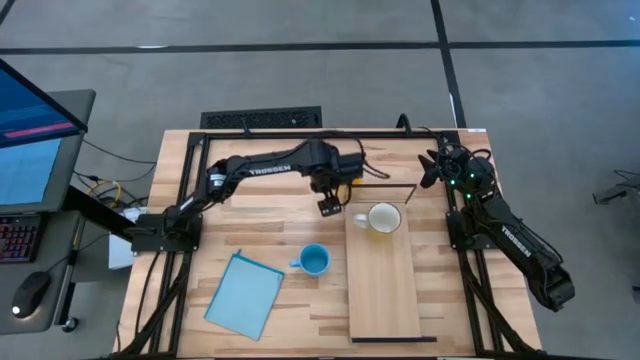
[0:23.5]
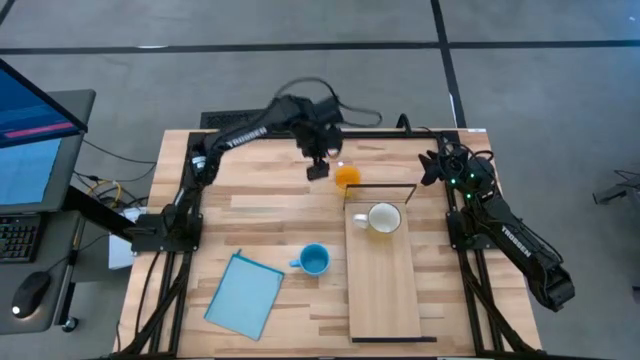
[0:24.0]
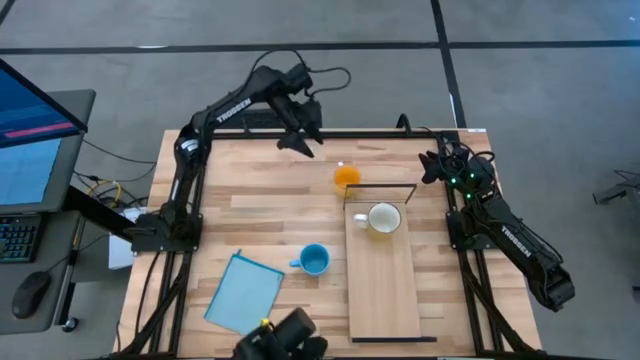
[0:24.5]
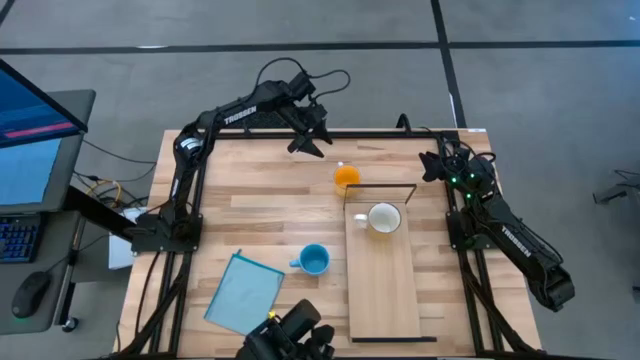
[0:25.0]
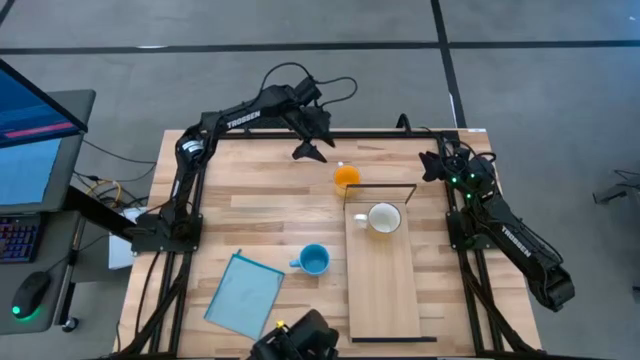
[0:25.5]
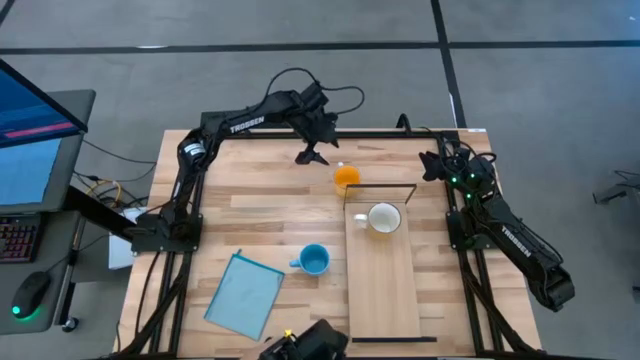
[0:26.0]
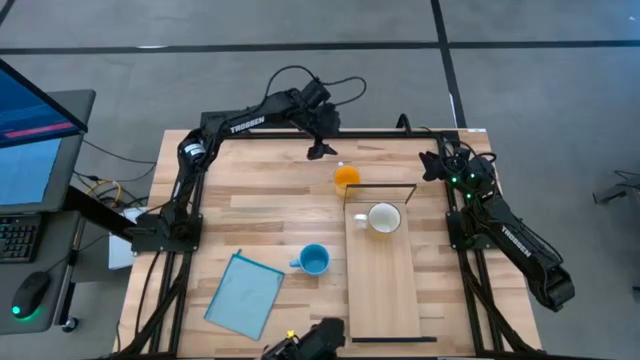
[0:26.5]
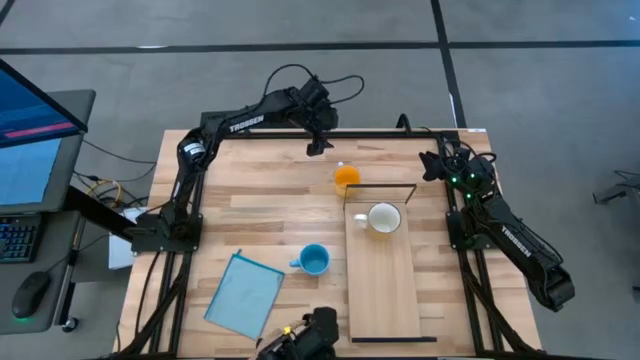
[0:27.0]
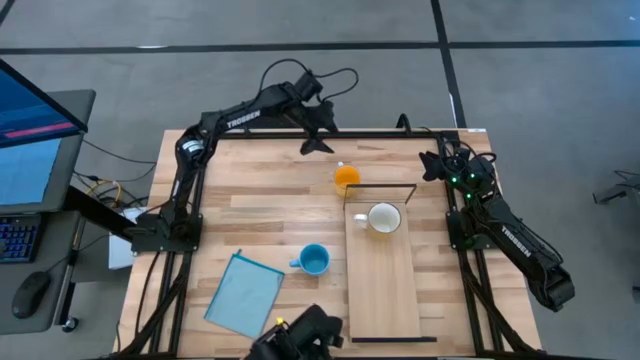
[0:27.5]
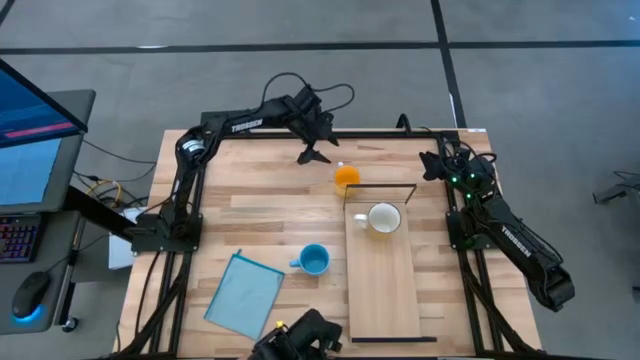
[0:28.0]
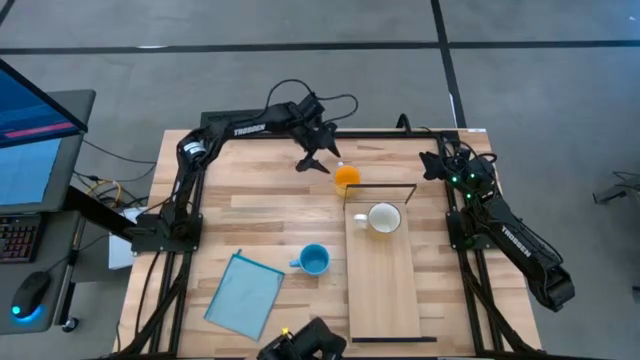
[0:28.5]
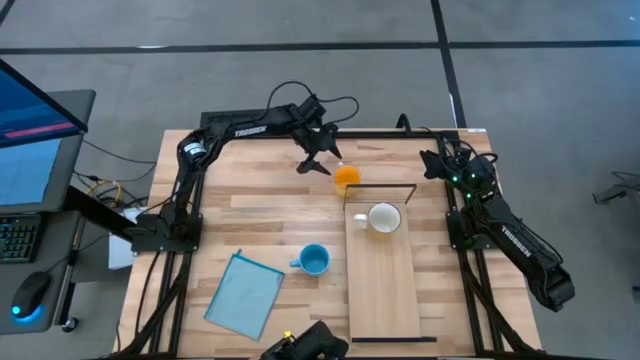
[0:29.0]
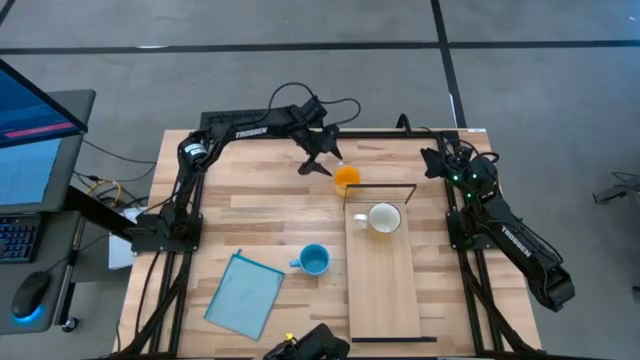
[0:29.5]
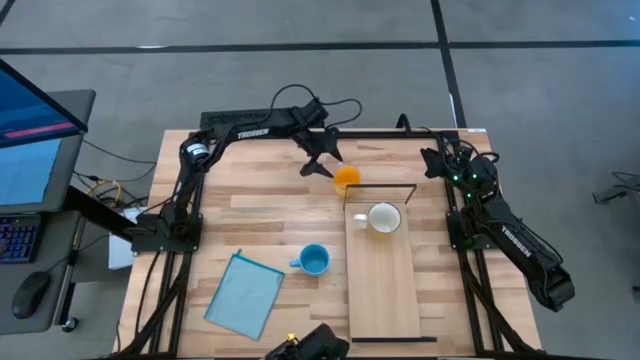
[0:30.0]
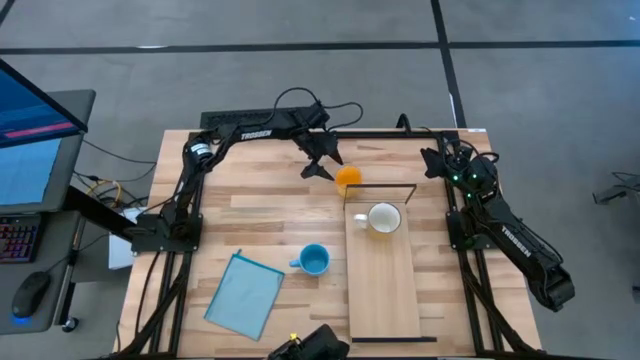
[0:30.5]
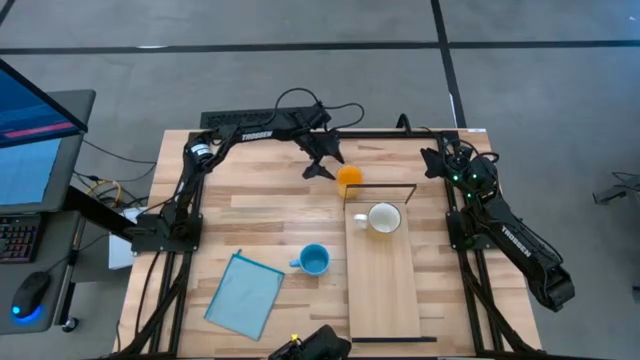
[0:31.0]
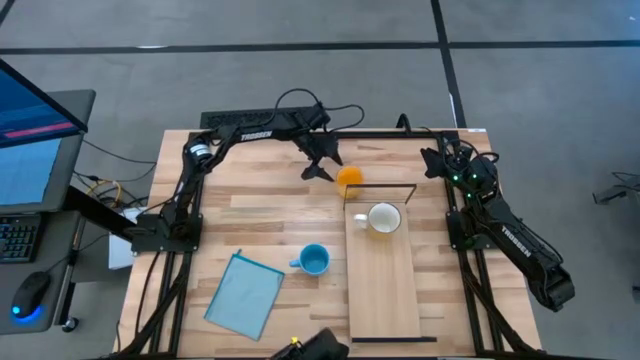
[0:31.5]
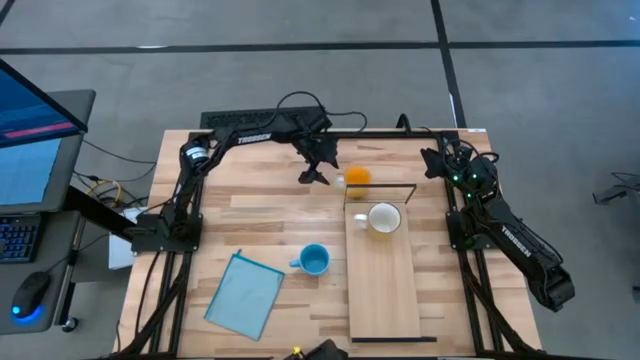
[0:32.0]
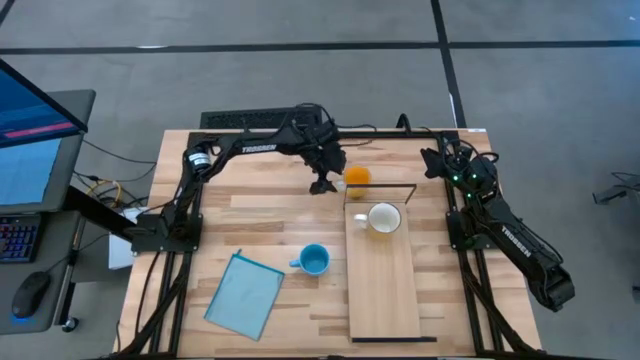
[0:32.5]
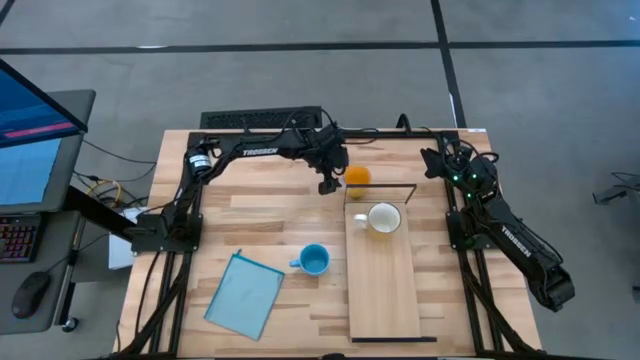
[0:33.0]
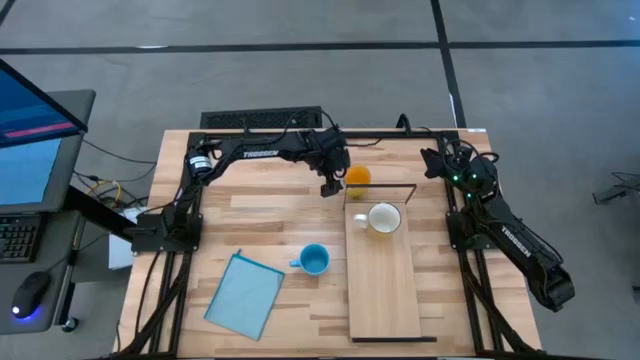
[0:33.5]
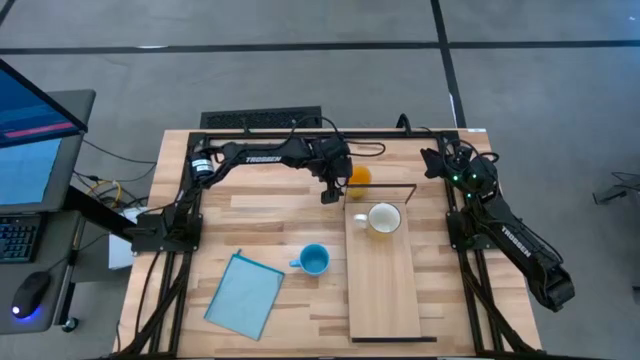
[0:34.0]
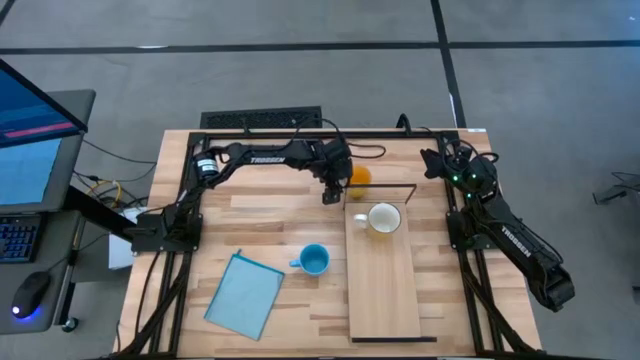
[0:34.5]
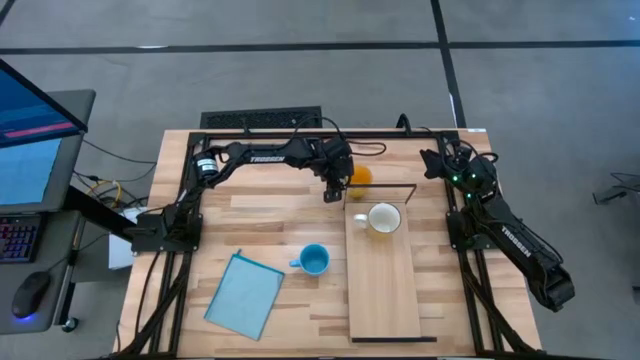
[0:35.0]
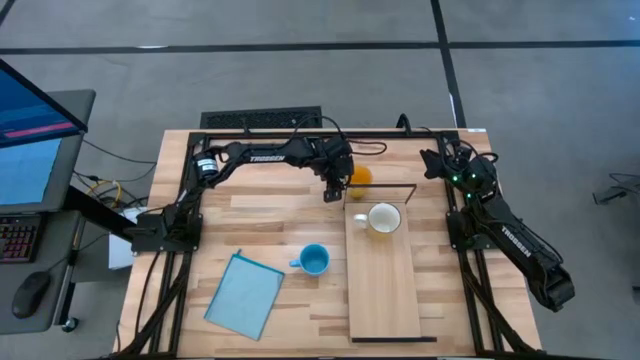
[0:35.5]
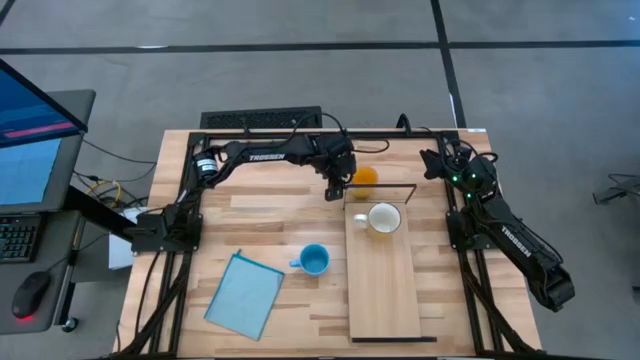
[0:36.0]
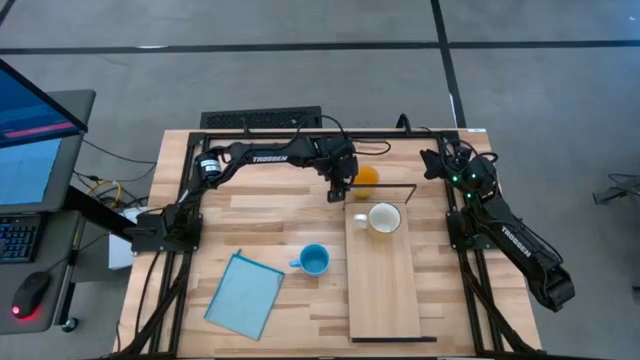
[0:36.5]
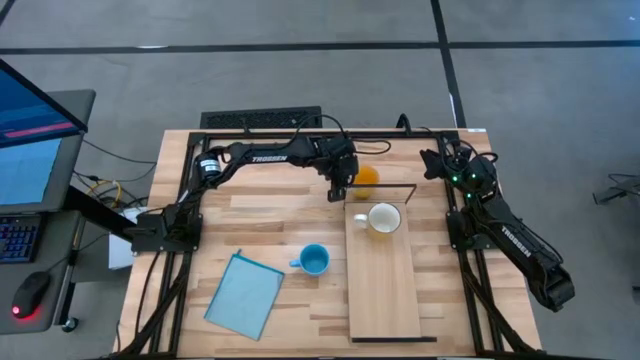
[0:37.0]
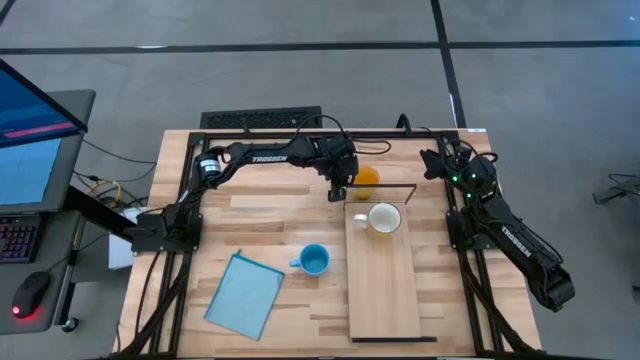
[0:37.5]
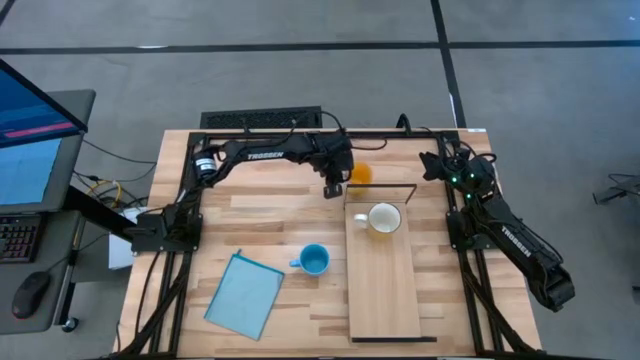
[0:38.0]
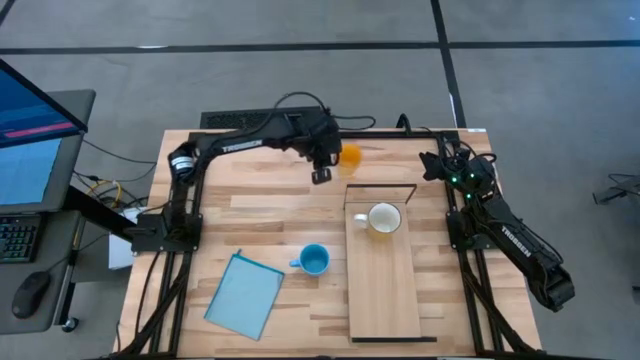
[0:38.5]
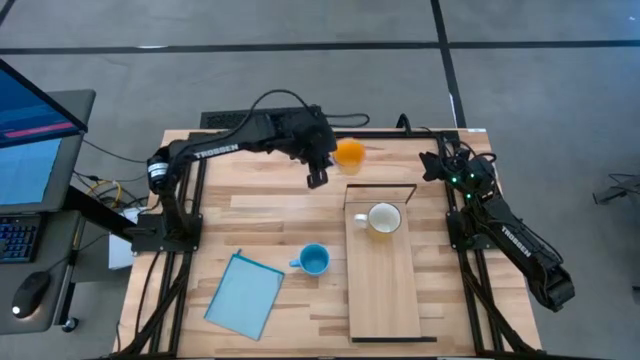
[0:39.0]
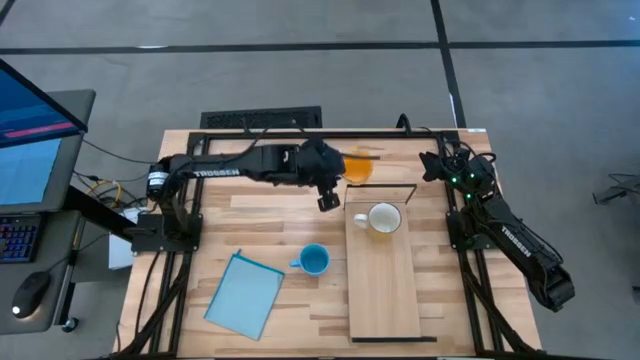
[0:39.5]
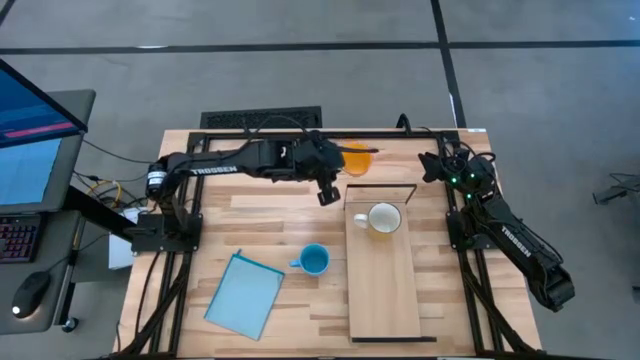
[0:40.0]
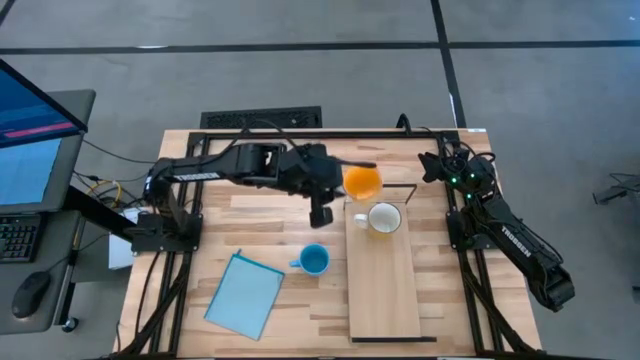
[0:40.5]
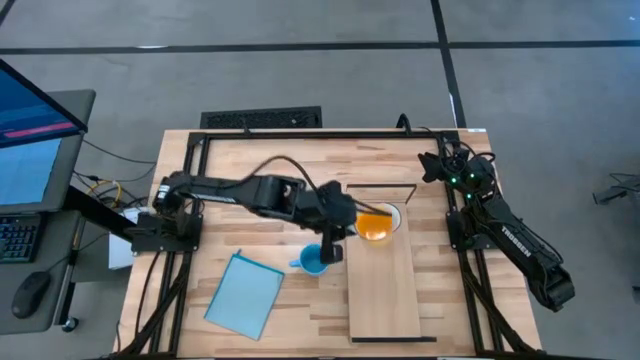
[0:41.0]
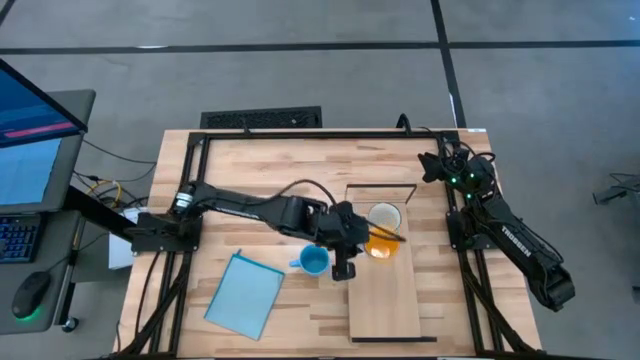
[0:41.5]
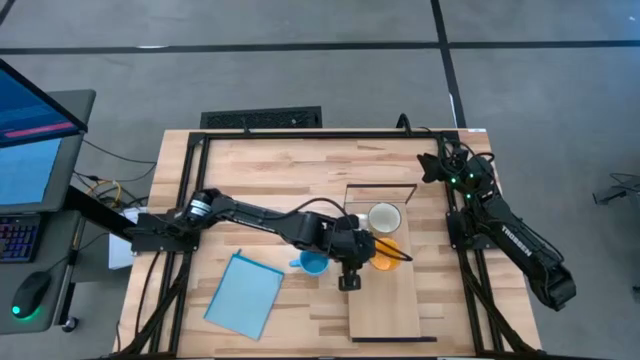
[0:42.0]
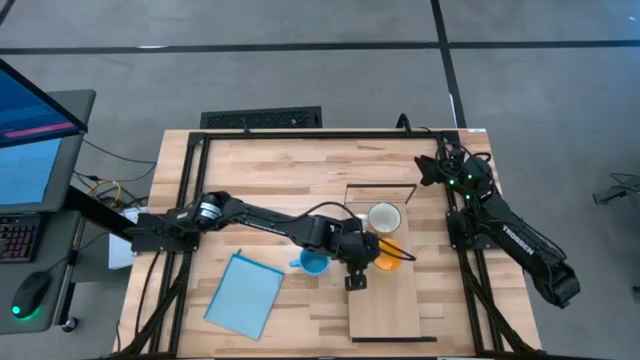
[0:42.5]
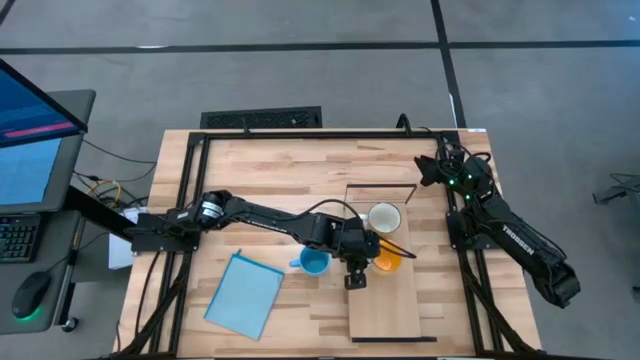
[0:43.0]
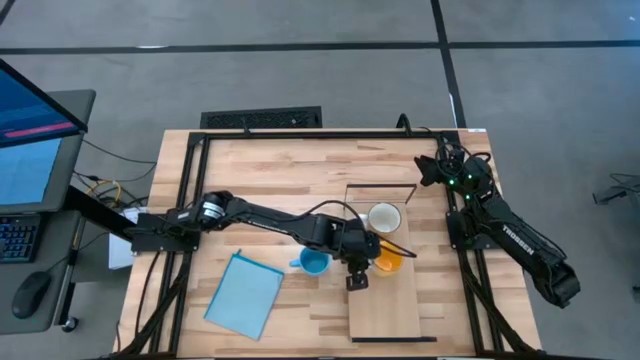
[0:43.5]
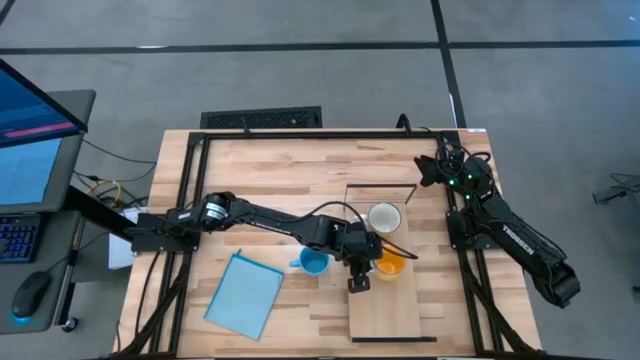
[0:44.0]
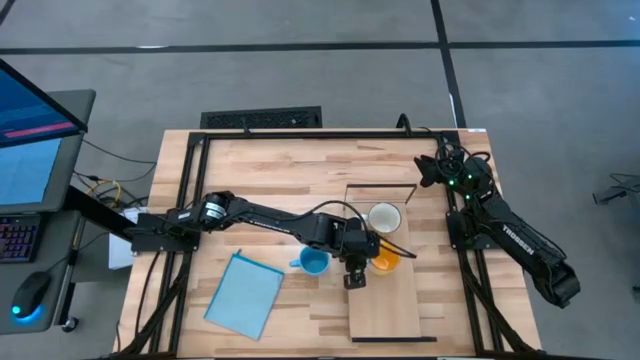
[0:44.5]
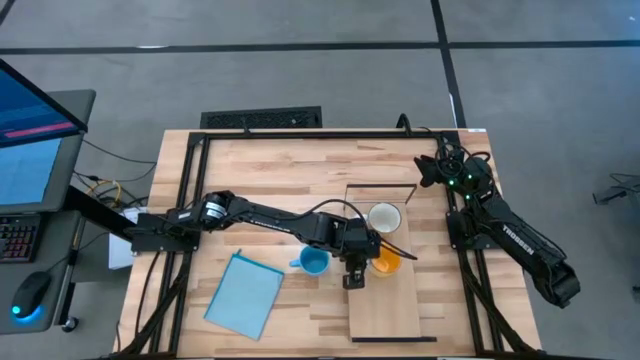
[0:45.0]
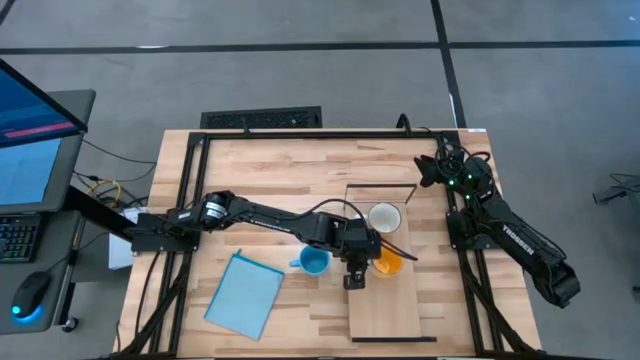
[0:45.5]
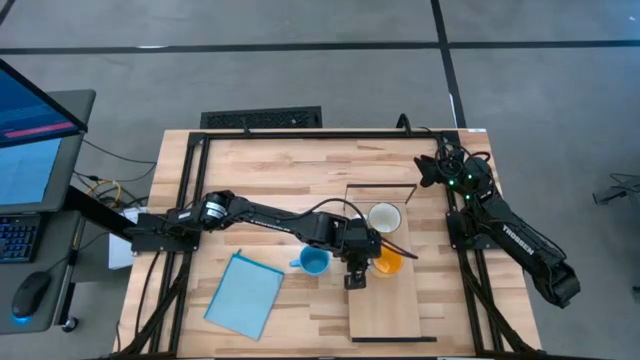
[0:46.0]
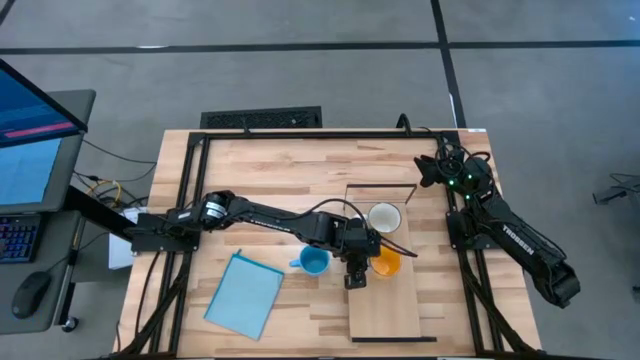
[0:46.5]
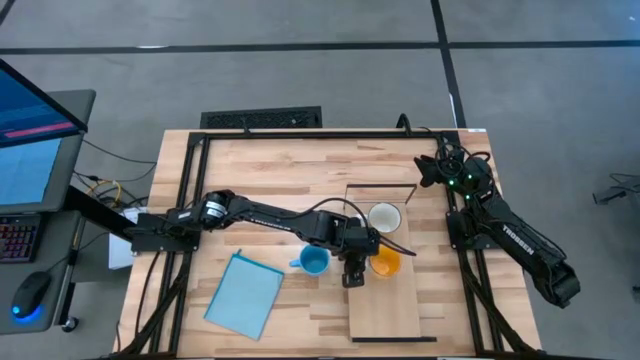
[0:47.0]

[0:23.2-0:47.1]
Task: Stack small to large cups/mugs on shelf
Put the yellow cup on the shelf
